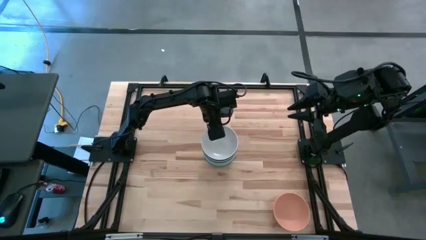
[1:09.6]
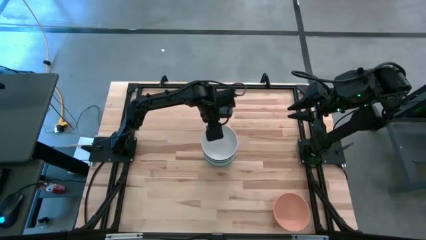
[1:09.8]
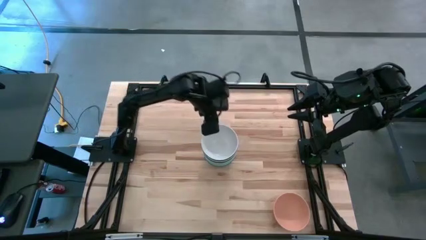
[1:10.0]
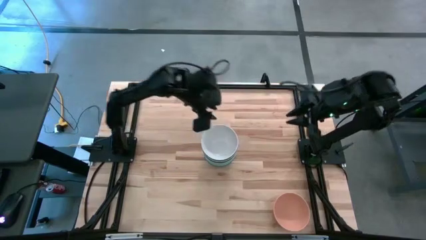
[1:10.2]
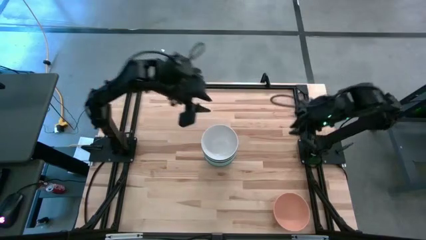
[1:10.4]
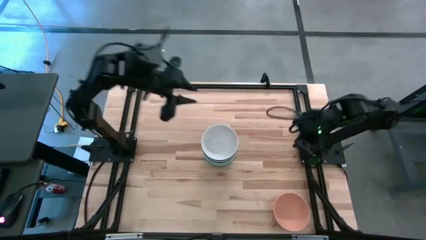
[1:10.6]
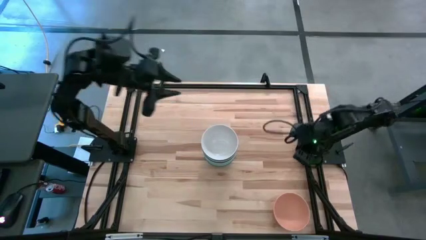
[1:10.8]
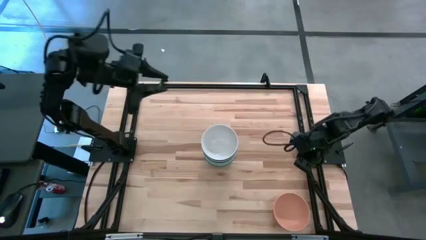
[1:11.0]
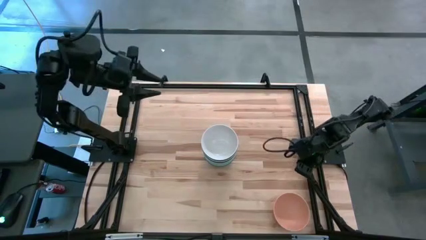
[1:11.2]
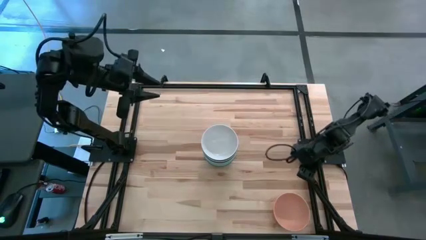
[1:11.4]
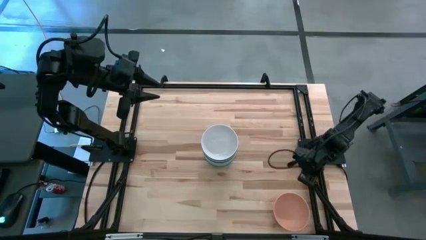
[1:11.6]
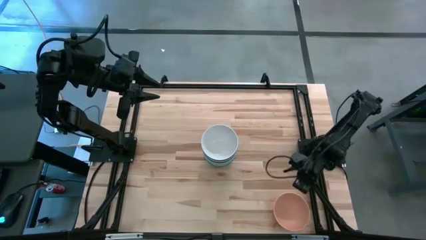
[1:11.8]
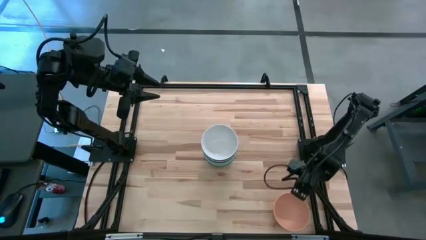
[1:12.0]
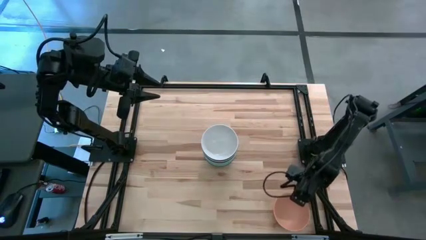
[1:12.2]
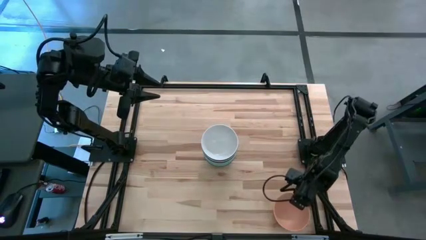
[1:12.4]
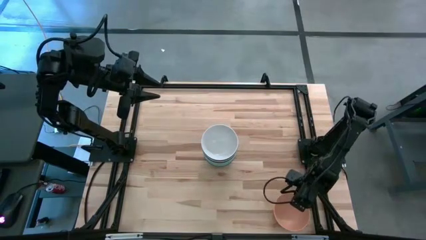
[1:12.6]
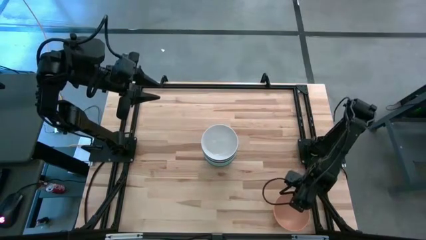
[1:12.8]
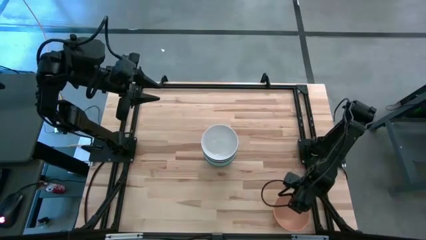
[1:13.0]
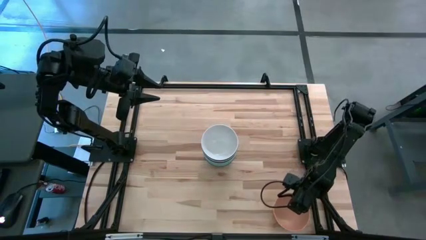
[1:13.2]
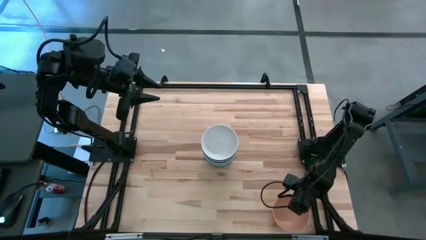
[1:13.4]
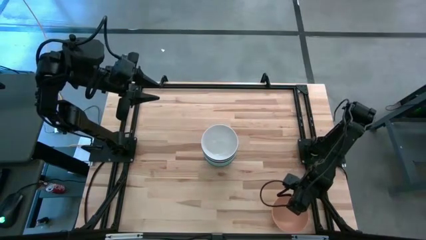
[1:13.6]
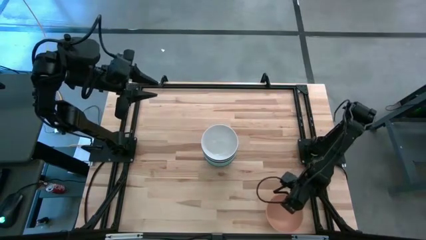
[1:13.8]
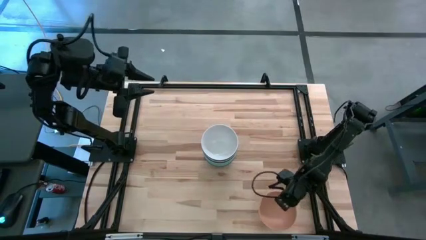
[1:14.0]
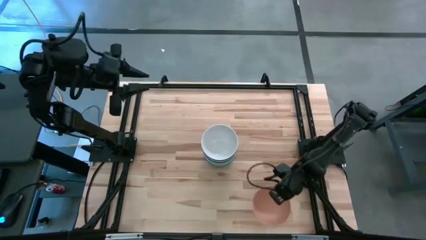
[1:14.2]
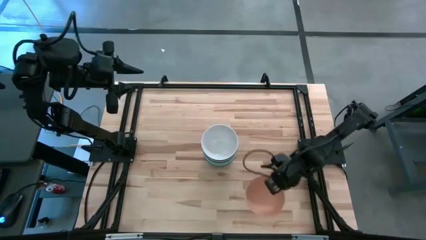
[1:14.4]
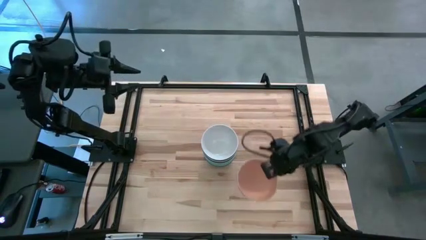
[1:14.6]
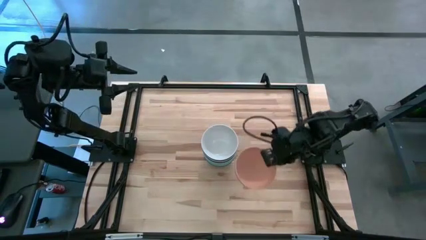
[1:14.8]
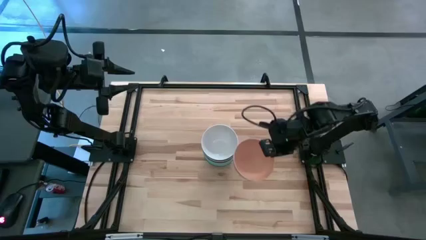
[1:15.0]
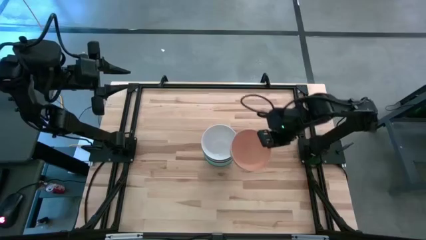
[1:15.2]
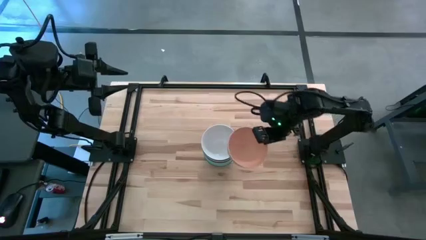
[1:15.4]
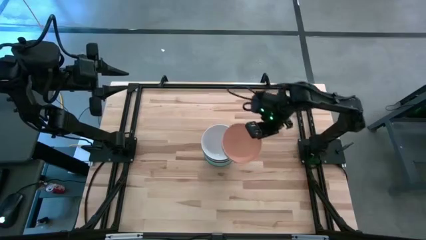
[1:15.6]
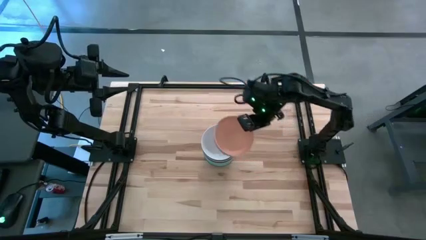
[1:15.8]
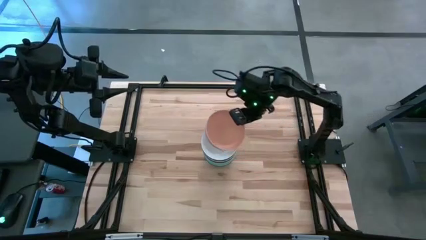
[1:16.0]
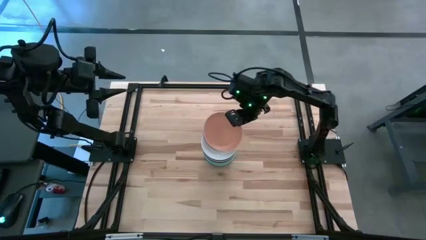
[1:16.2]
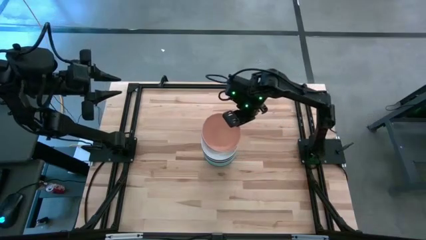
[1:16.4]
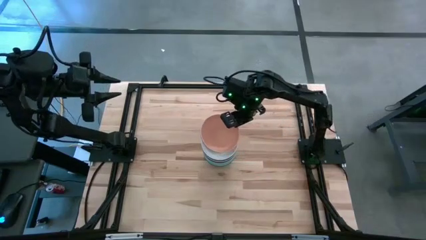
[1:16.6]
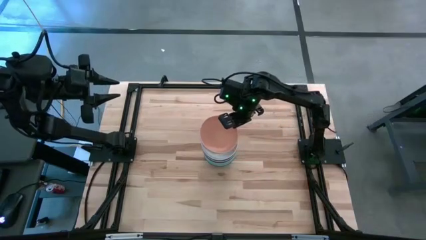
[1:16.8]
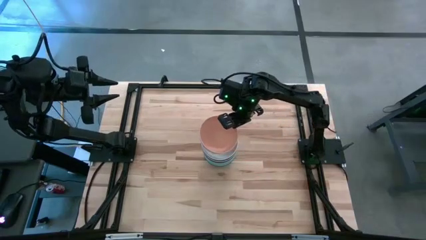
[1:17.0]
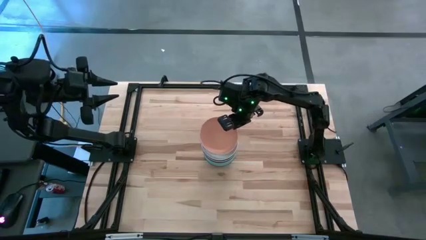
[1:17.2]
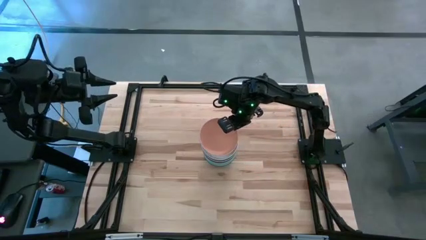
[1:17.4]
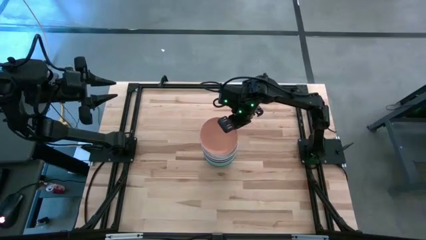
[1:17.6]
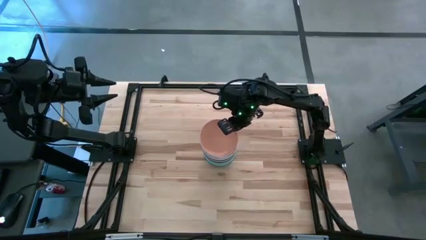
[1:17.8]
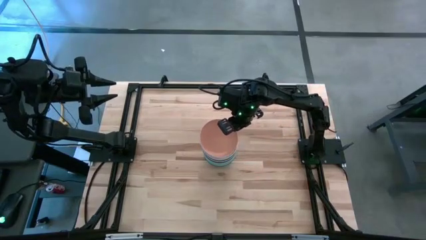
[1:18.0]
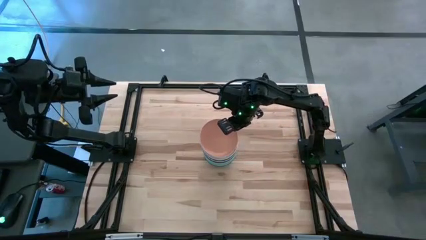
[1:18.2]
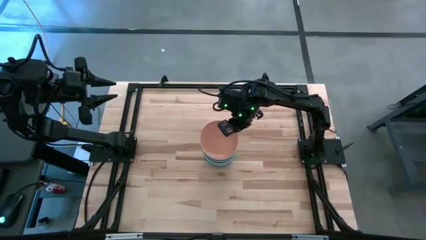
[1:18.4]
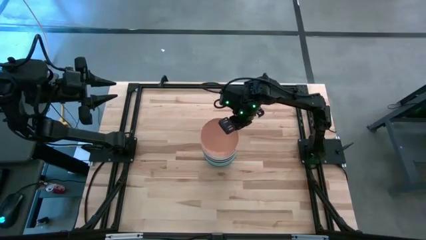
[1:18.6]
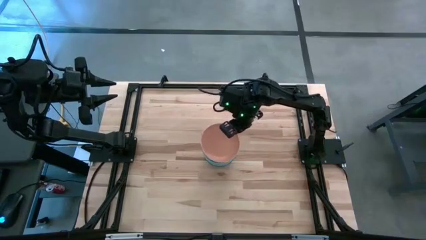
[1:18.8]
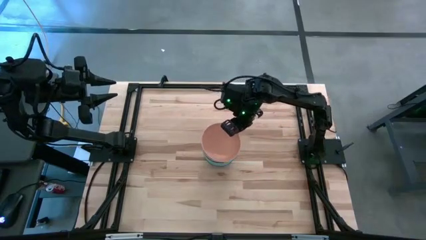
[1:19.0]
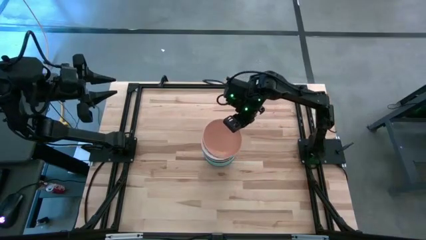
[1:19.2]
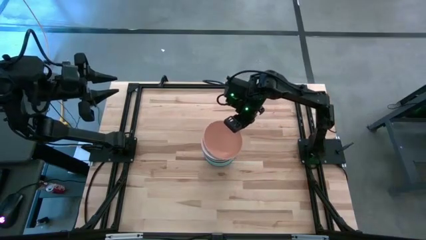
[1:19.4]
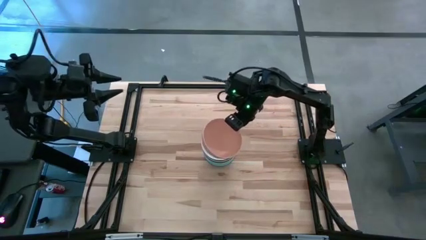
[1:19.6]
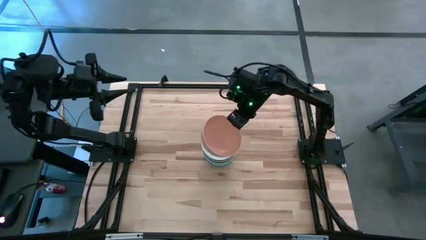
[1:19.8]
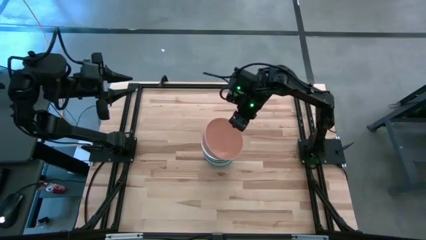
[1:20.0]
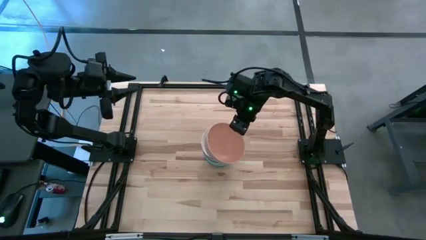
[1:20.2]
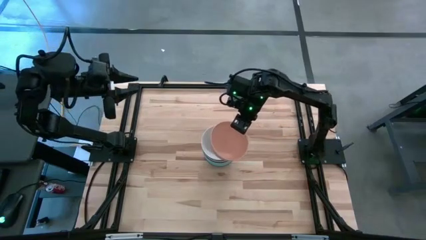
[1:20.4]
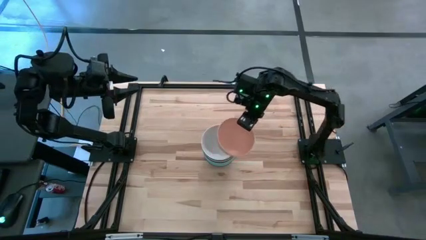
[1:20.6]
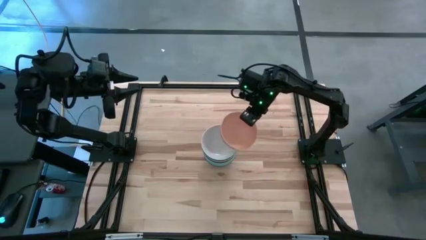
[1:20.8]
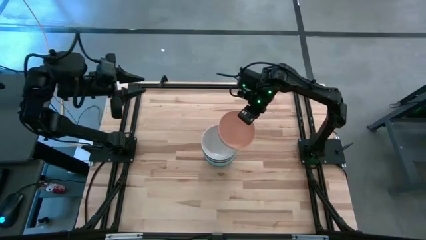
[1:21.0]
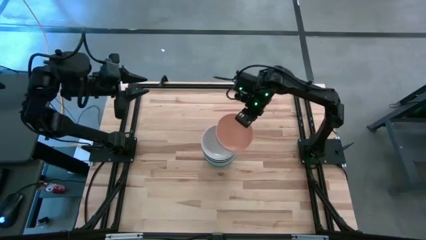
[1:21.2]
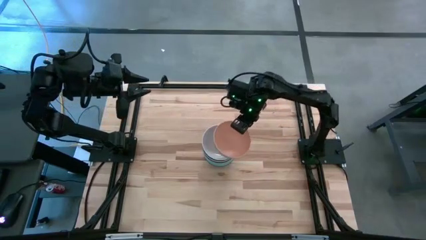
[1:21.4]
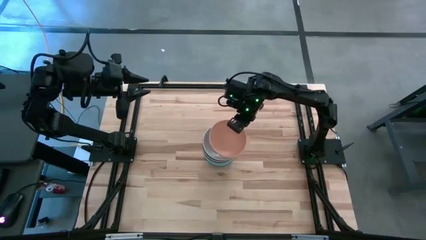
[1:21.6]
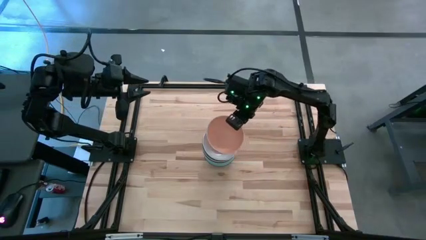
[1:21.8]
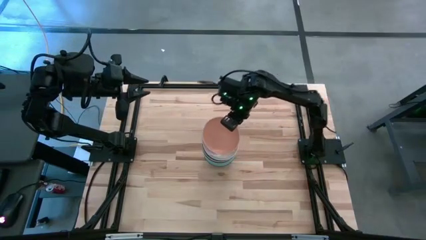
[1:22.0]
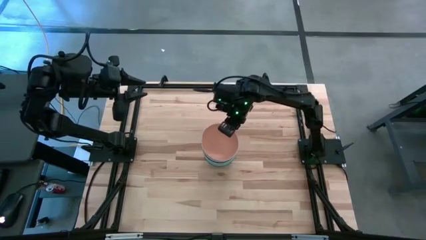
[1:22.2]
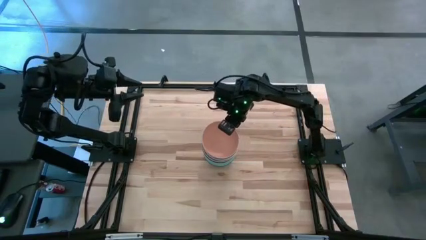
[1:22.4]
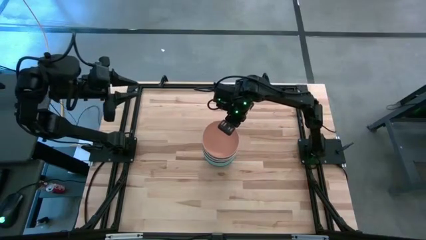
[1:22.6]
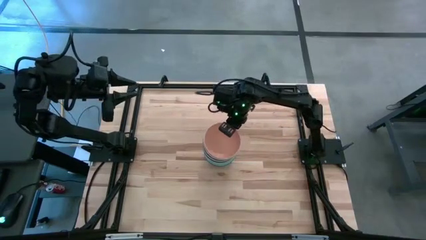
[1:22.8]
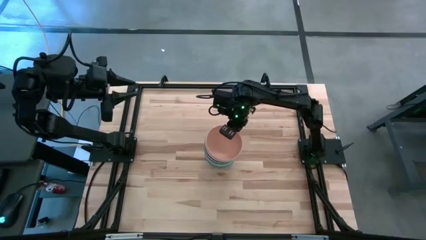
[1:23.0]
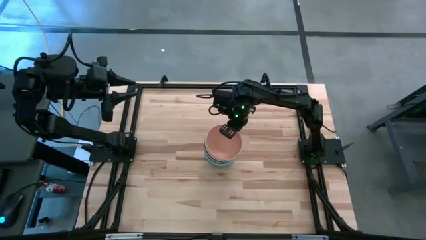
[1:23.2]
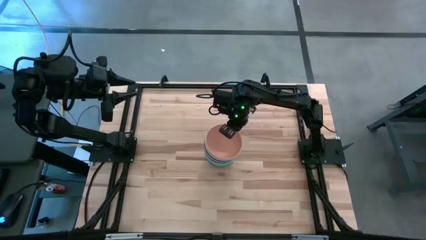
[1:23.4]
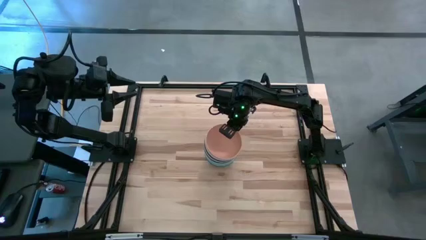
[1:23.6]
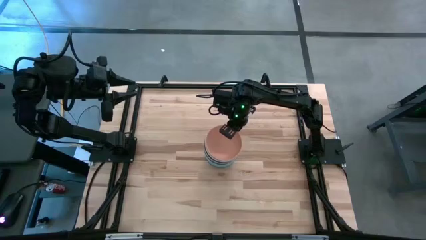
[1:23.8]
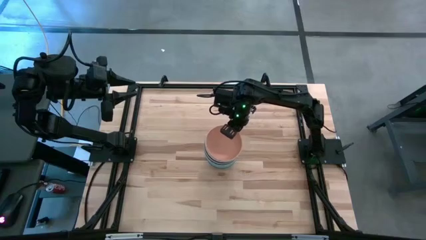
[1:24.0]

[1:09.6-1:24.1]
Task: Nest bowls inside each other
Stack the orange bowl on the white bowl
